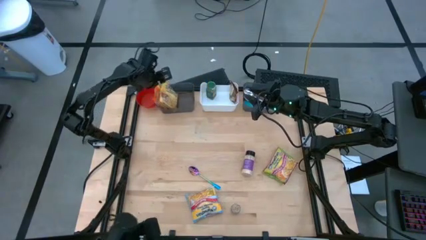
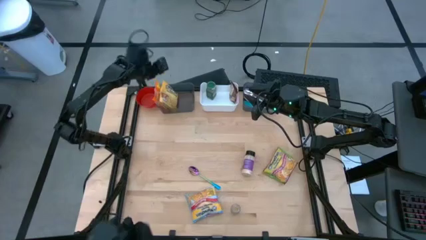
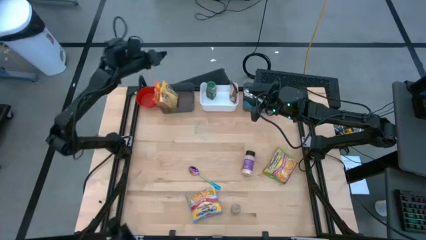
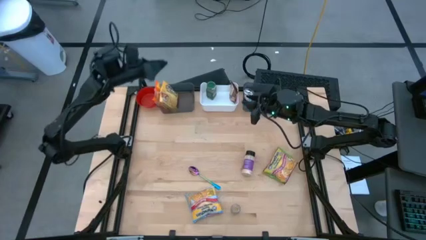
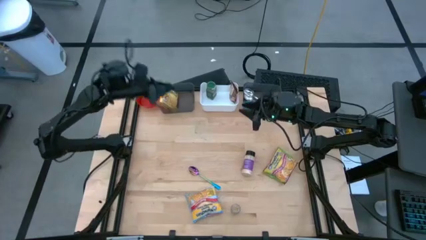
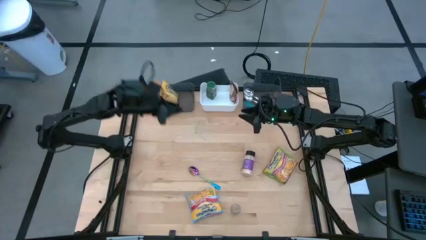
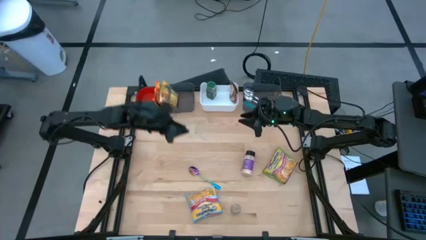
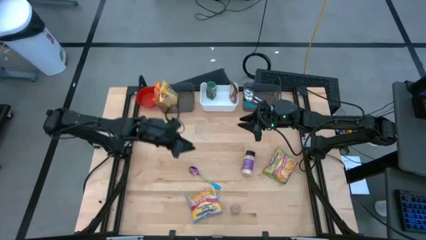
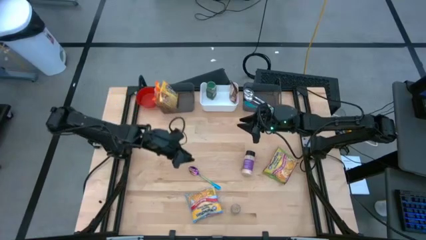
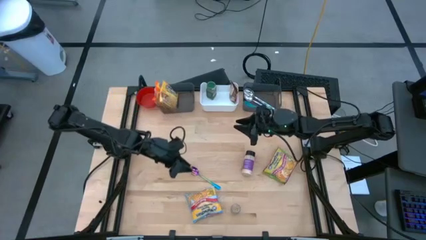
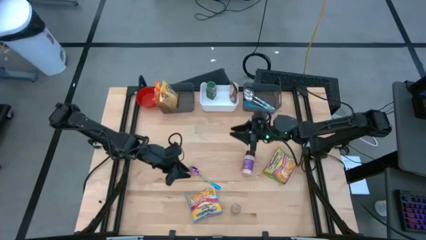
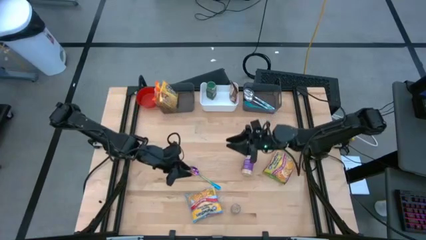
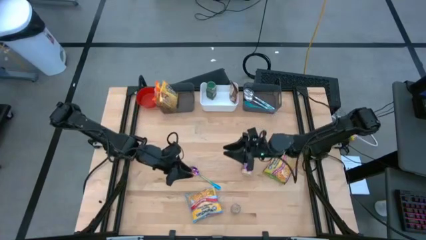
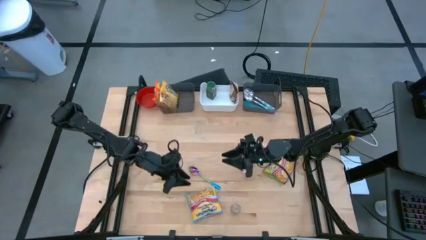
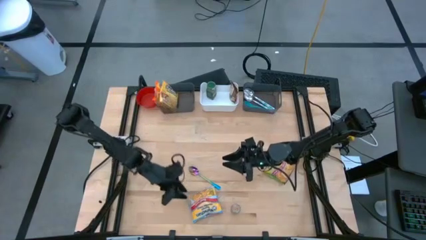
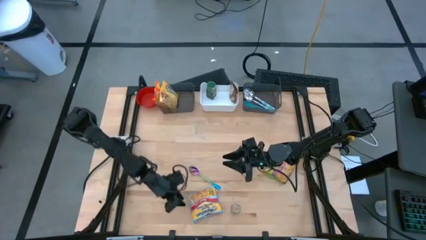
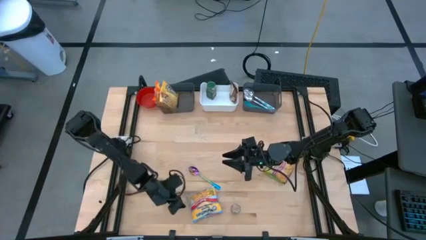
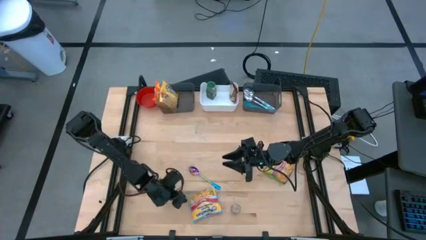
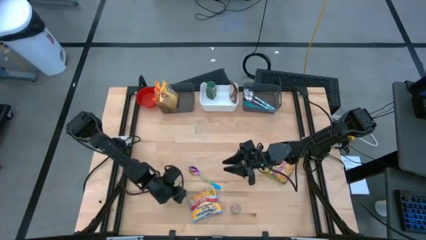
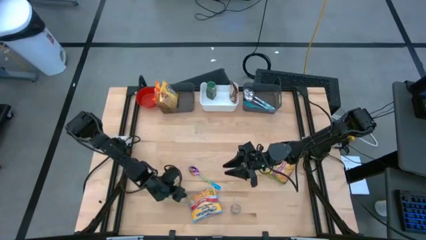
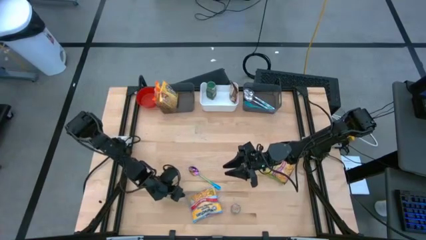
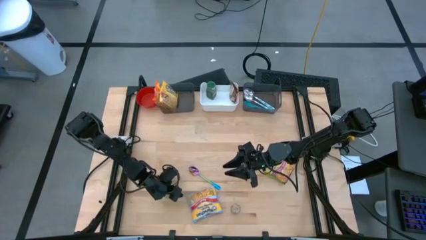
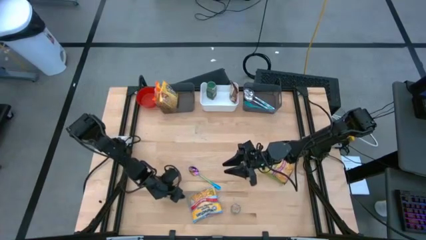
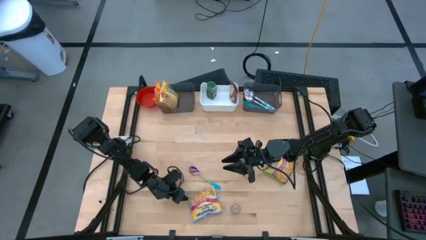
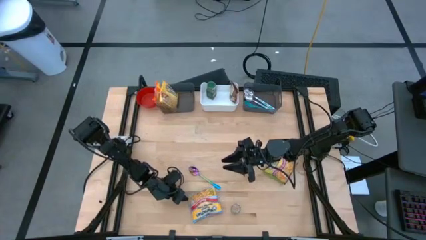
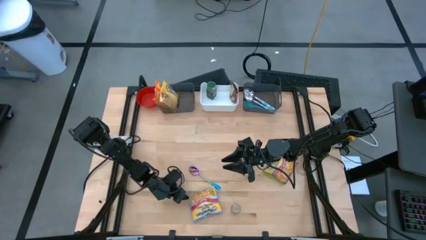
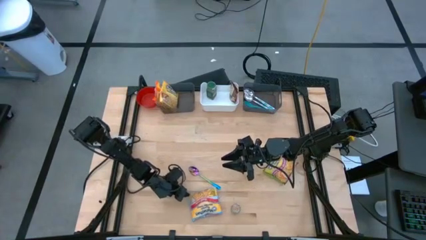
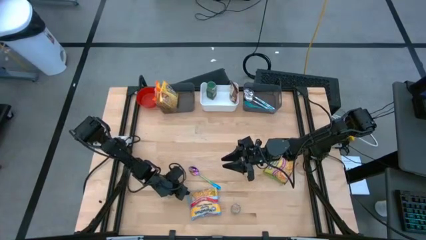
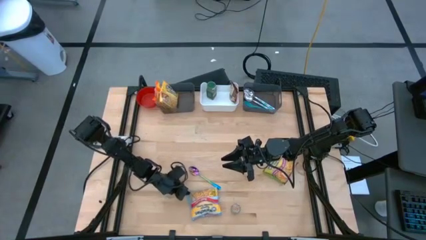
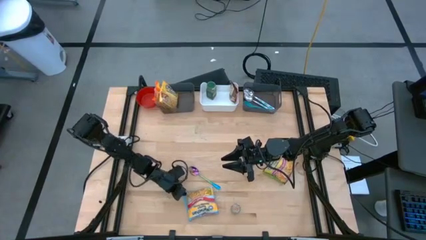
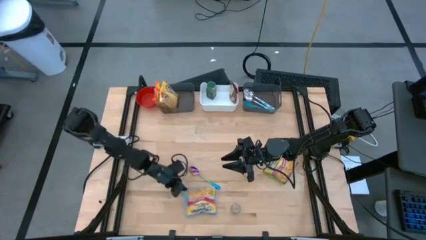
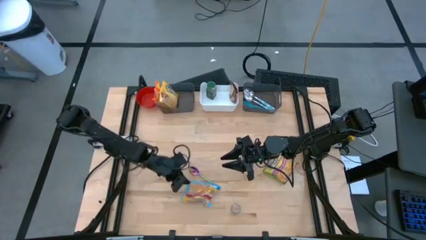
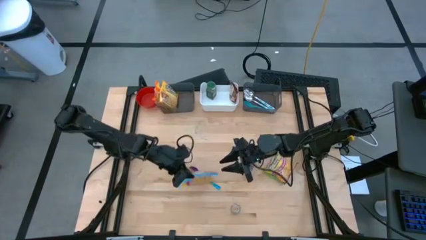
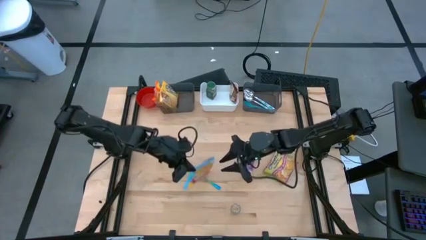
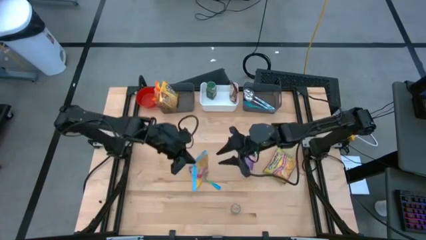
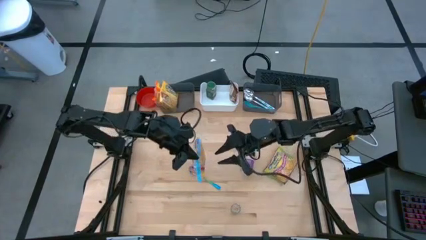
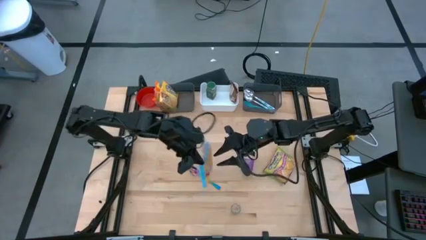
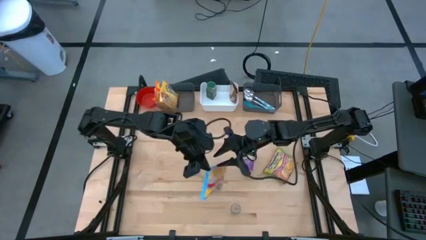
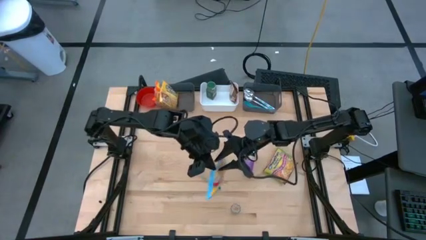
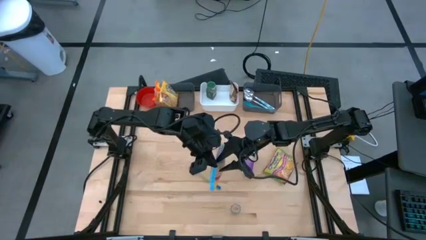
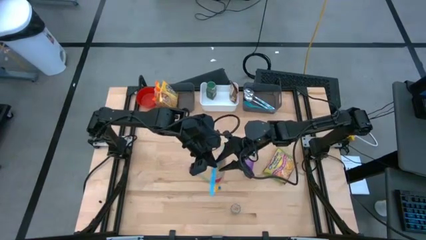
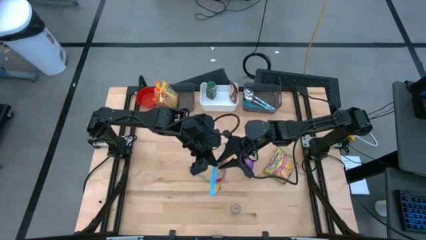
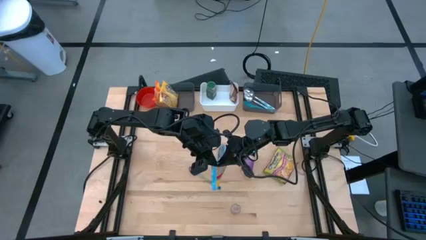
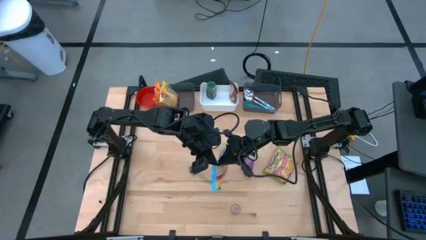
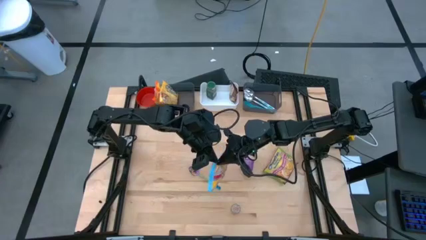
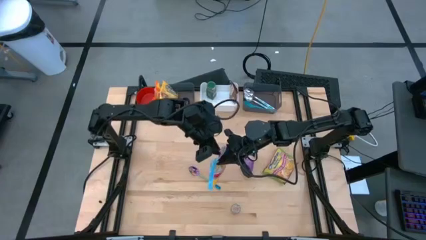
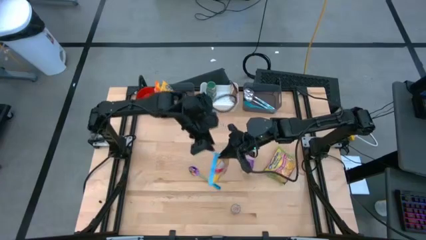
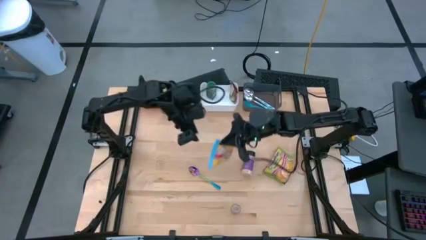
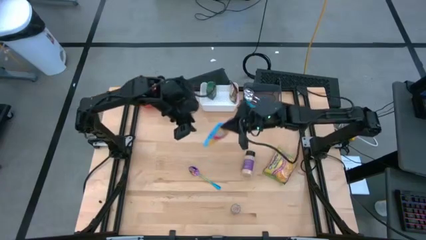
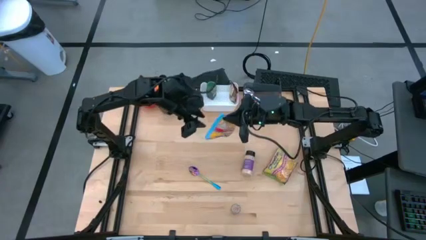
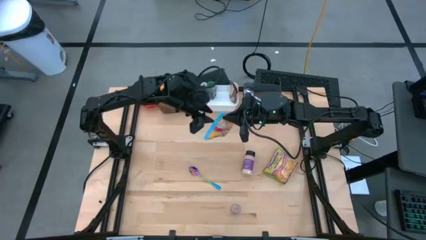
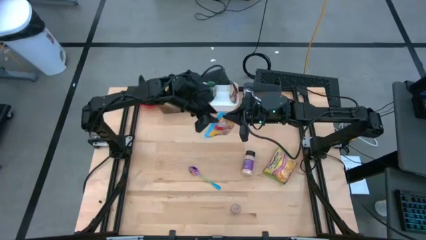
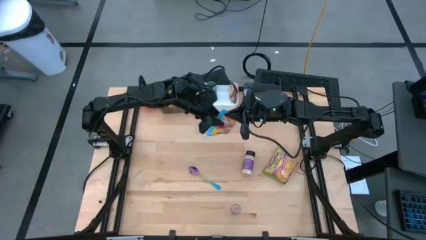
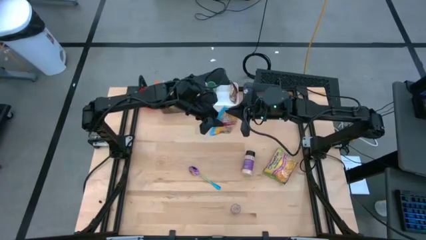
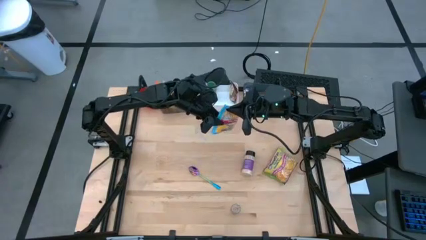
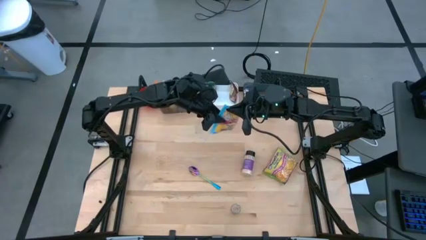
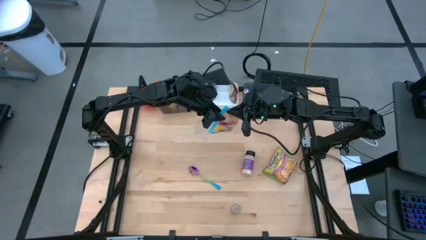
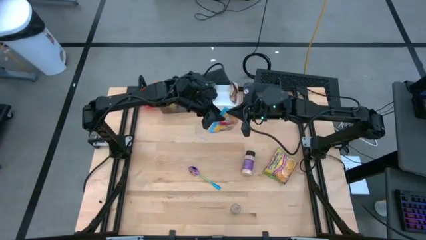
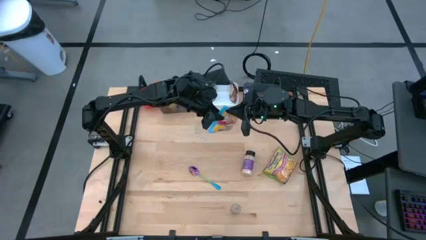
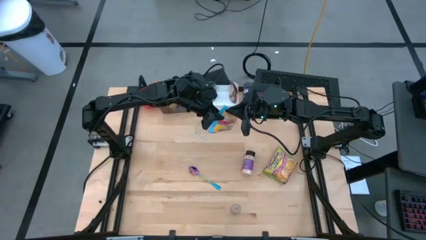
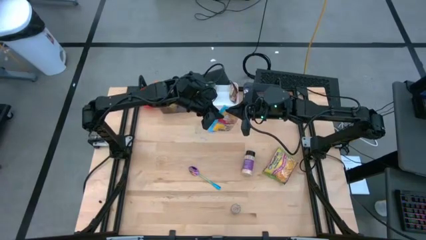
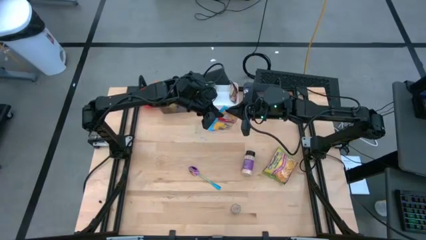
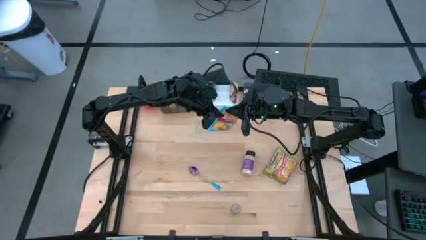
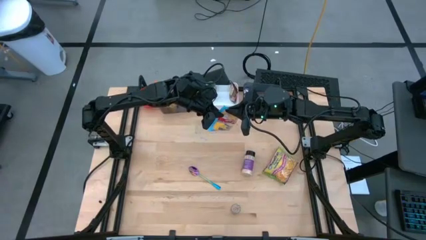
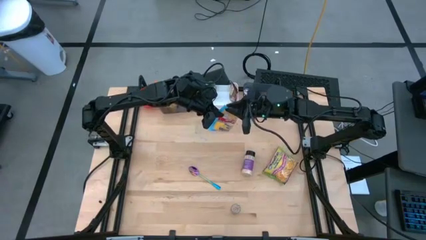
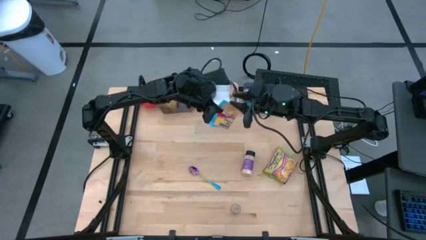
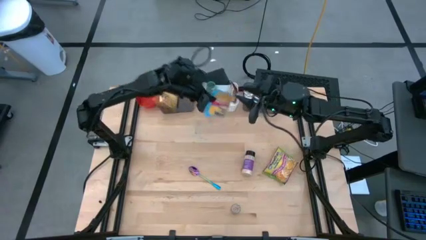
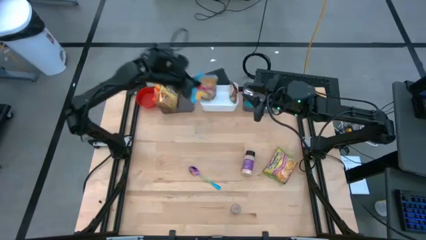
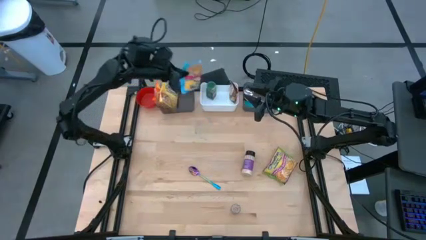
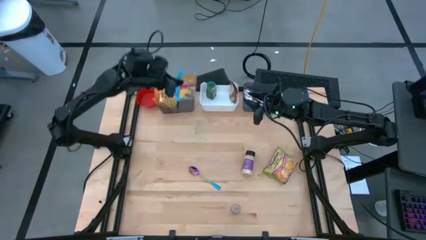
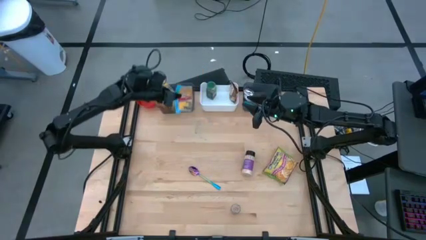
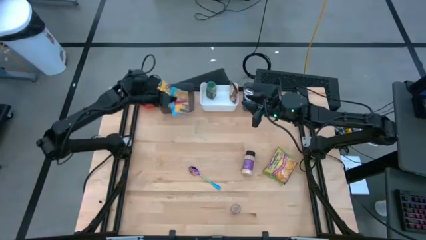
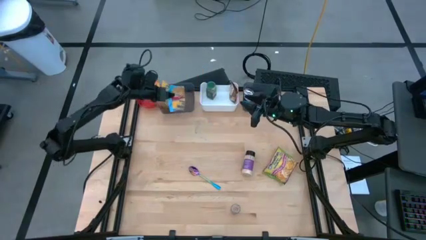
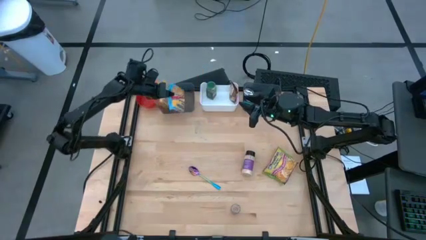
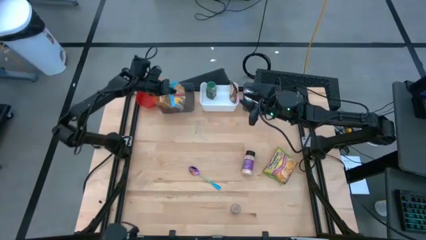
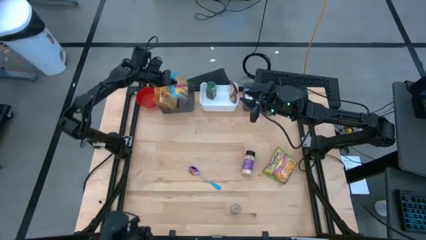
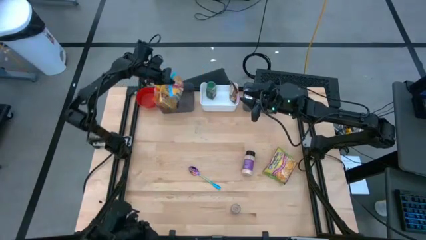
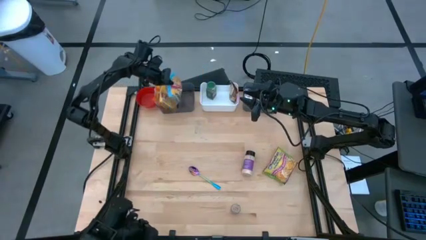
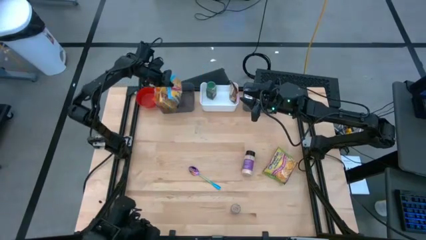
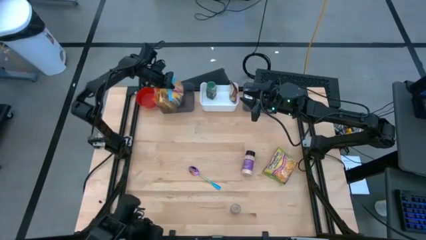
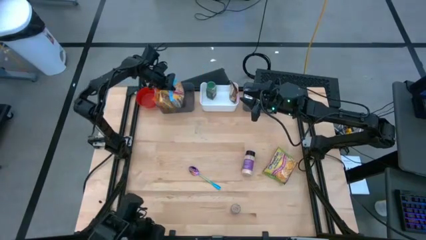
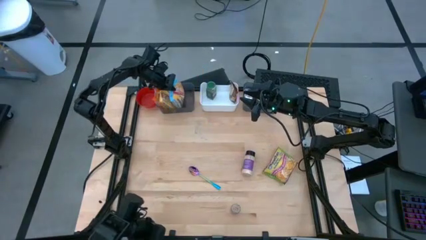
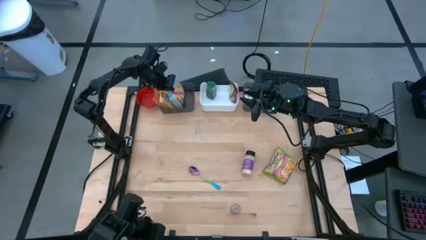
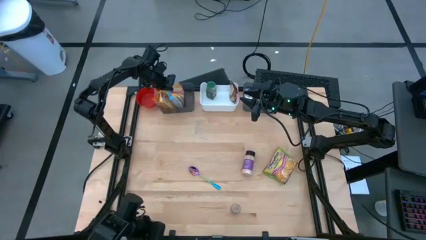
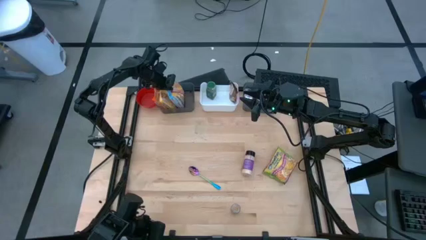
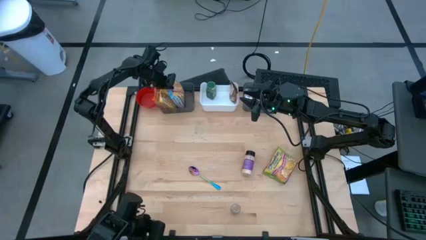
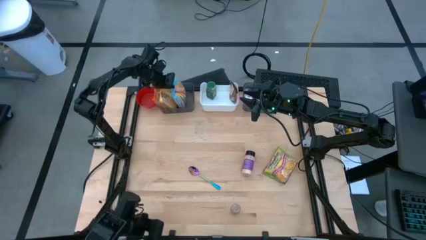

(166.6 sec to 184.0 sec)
Task: Pick & Place Food Item
Put the blue noodle pack into the left black bin
